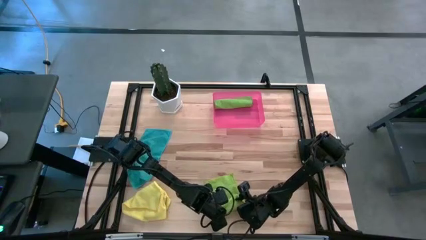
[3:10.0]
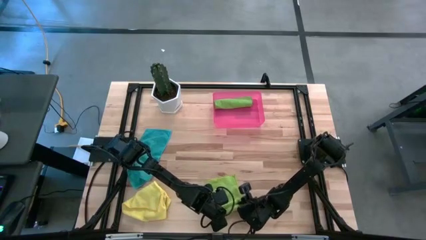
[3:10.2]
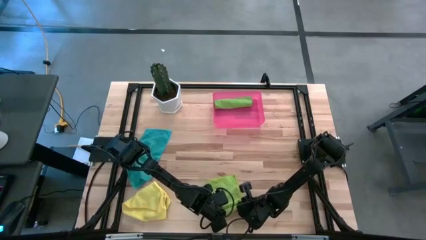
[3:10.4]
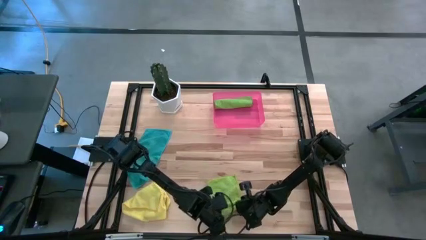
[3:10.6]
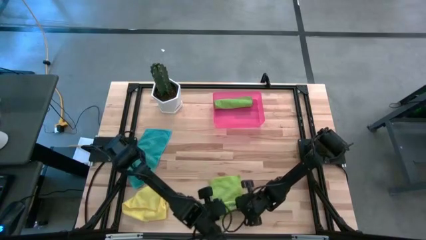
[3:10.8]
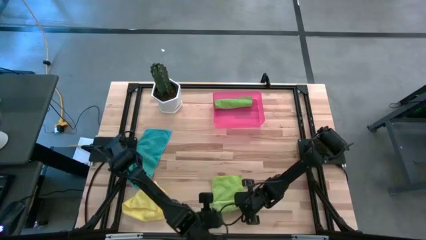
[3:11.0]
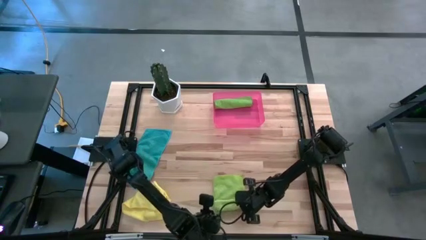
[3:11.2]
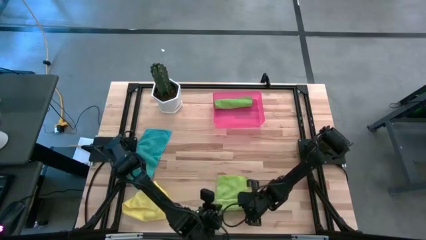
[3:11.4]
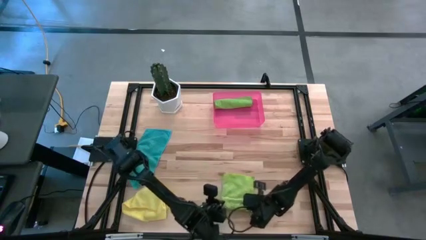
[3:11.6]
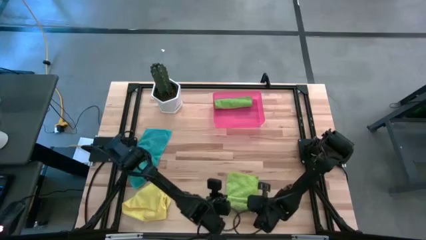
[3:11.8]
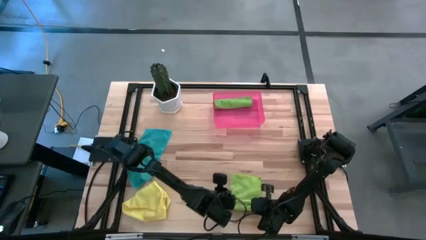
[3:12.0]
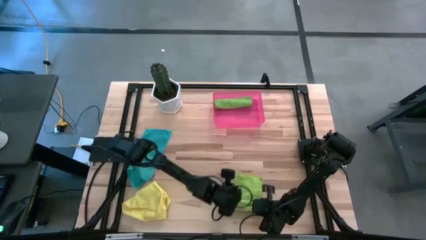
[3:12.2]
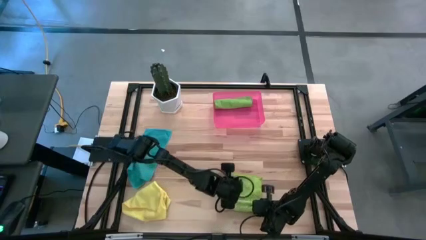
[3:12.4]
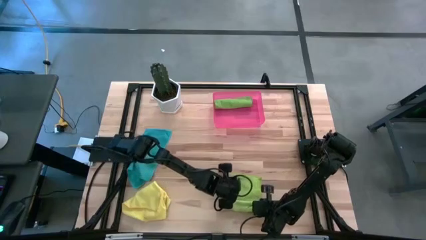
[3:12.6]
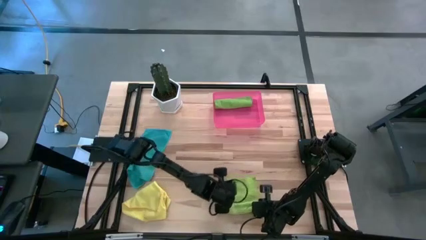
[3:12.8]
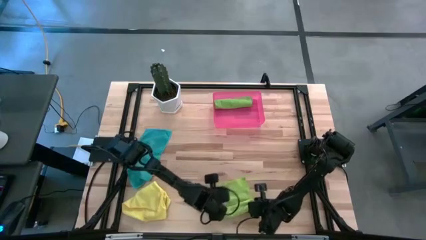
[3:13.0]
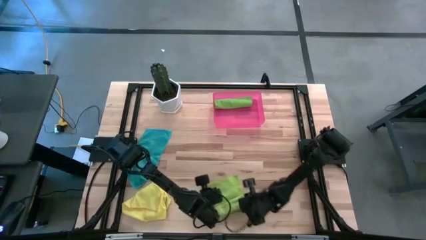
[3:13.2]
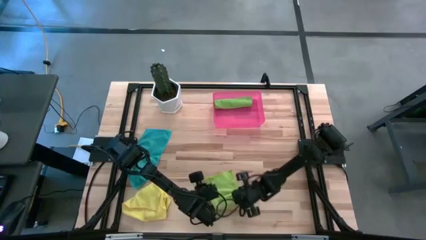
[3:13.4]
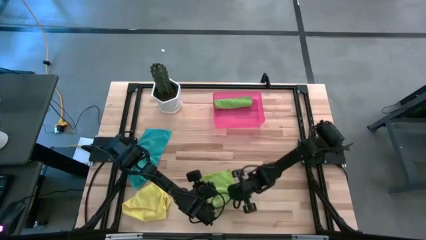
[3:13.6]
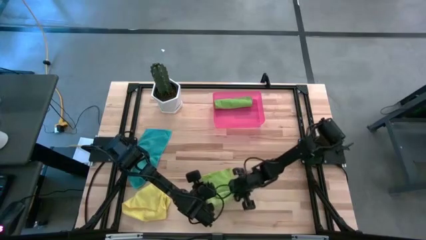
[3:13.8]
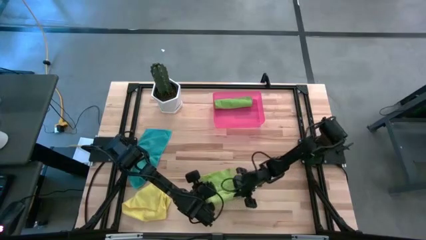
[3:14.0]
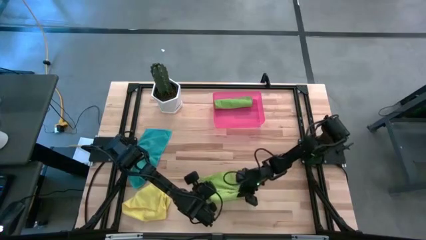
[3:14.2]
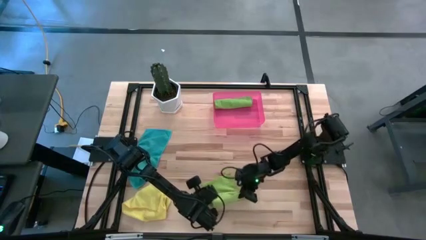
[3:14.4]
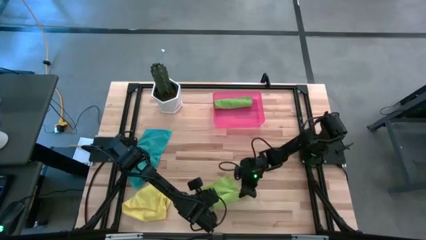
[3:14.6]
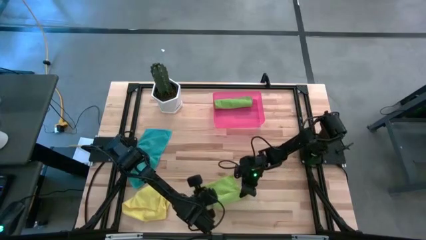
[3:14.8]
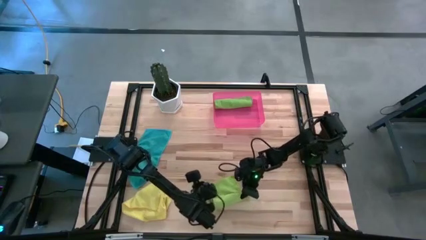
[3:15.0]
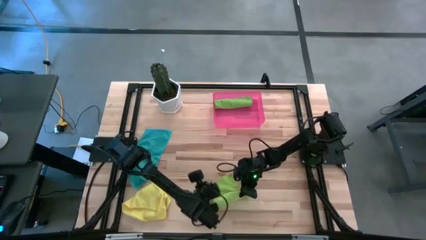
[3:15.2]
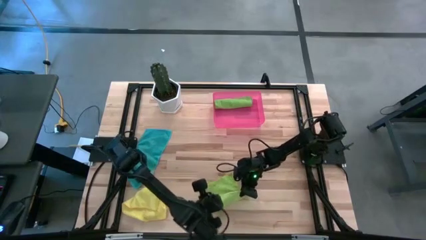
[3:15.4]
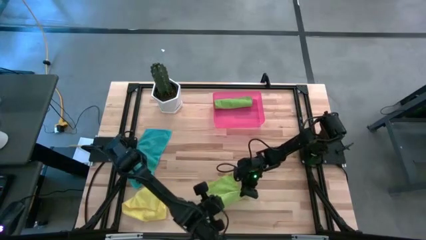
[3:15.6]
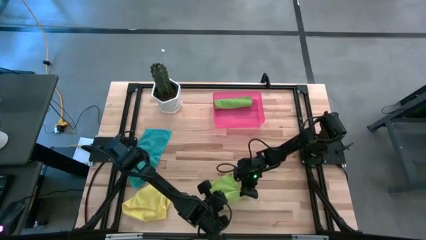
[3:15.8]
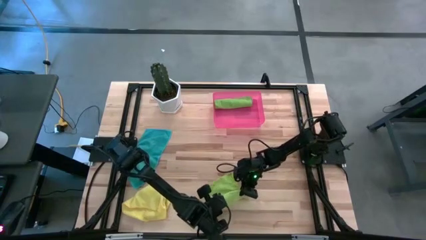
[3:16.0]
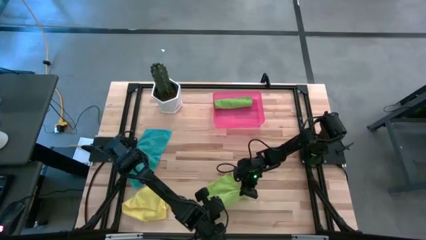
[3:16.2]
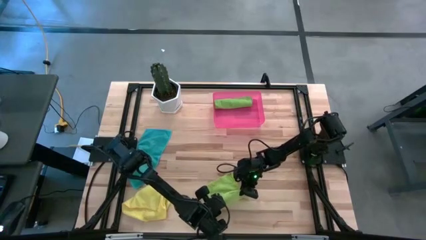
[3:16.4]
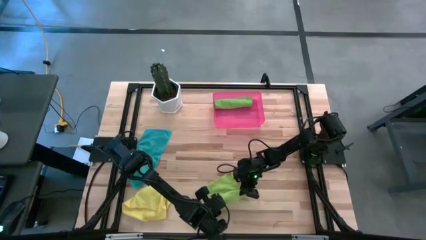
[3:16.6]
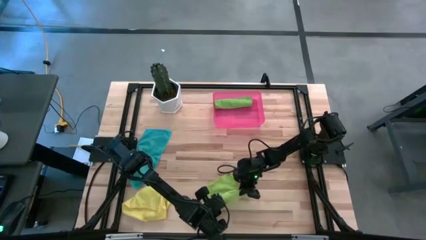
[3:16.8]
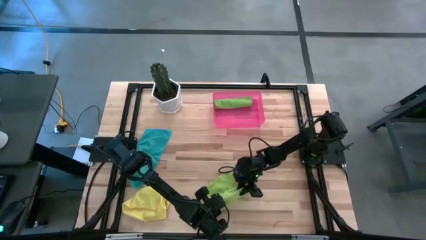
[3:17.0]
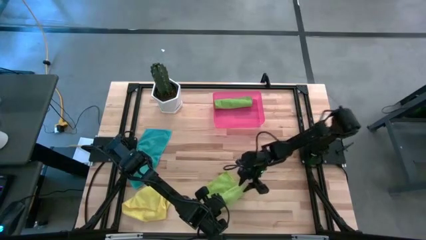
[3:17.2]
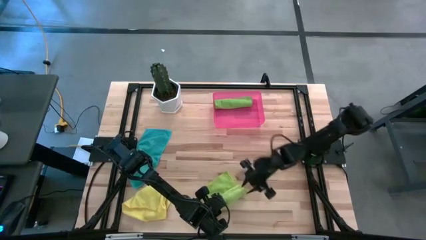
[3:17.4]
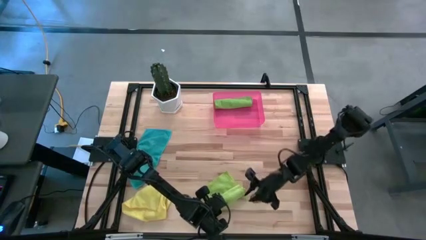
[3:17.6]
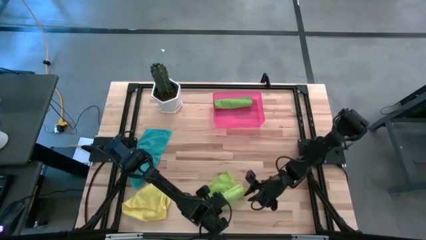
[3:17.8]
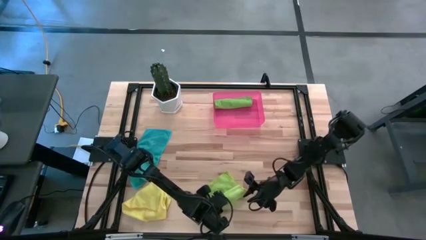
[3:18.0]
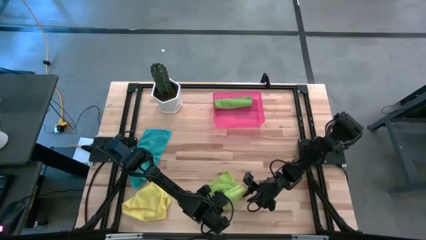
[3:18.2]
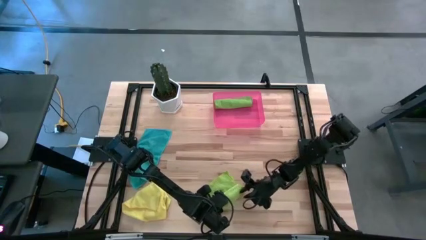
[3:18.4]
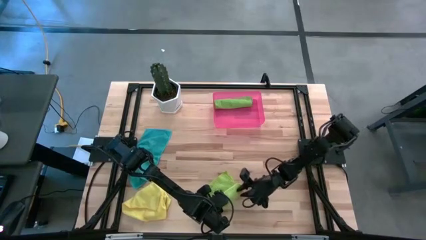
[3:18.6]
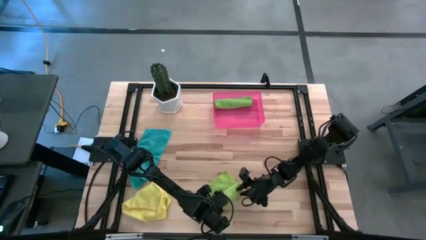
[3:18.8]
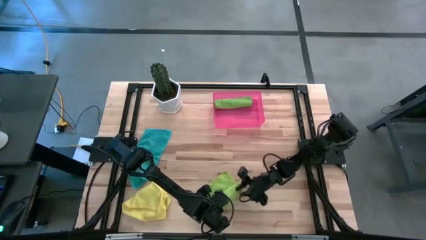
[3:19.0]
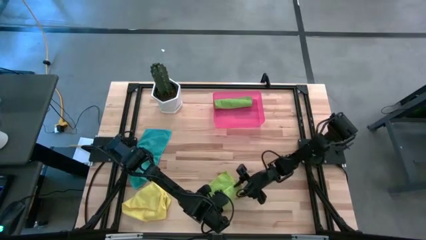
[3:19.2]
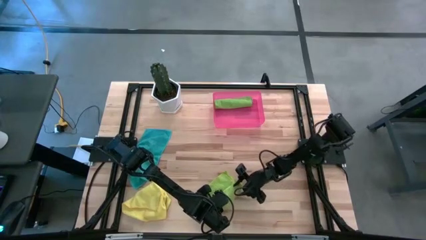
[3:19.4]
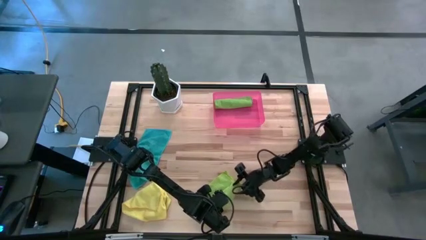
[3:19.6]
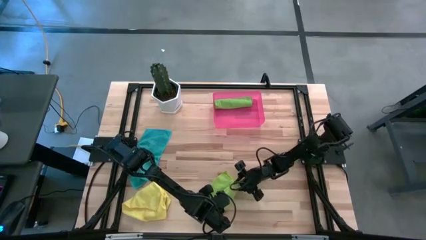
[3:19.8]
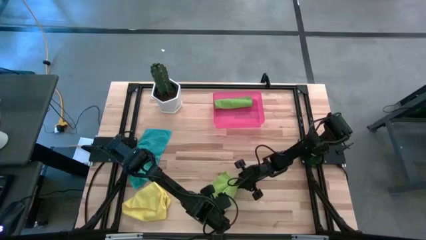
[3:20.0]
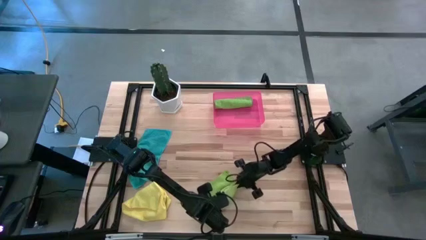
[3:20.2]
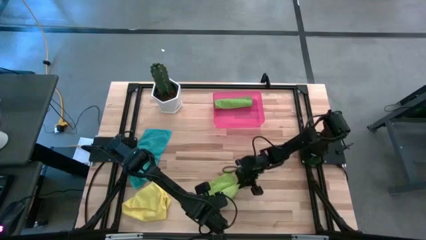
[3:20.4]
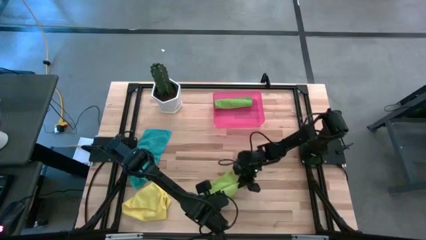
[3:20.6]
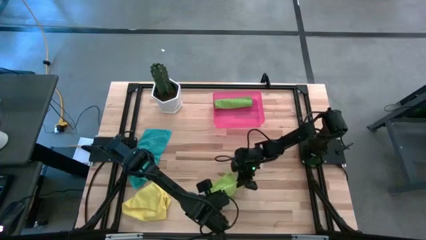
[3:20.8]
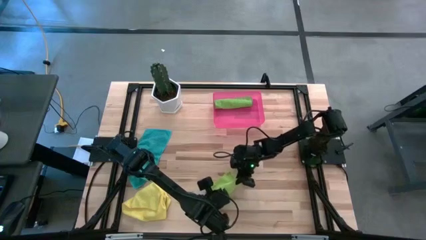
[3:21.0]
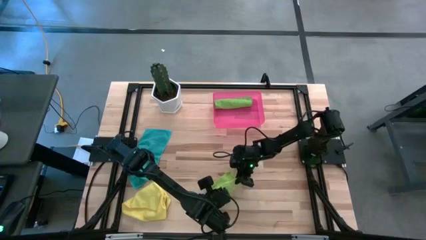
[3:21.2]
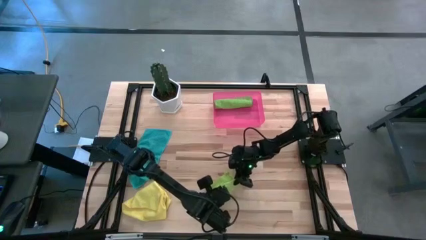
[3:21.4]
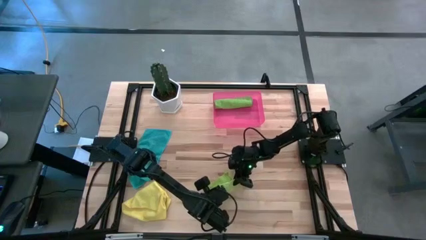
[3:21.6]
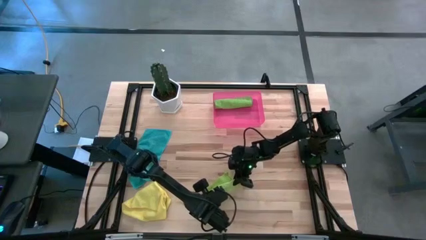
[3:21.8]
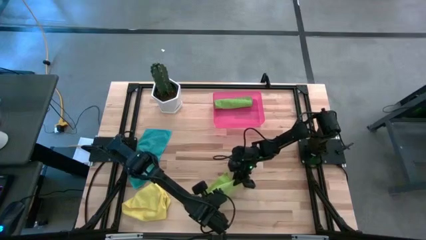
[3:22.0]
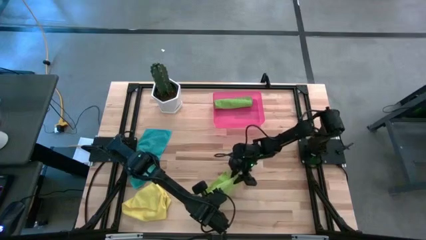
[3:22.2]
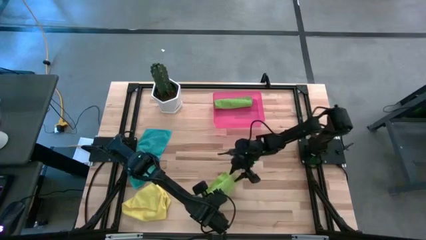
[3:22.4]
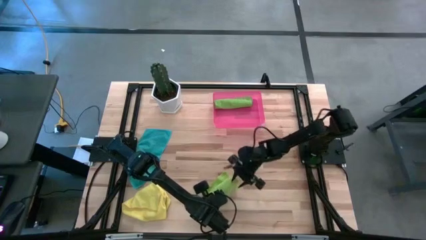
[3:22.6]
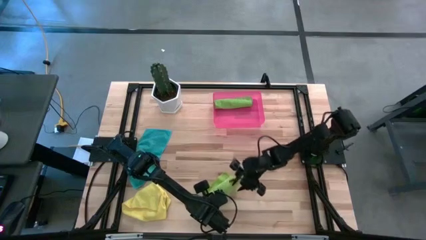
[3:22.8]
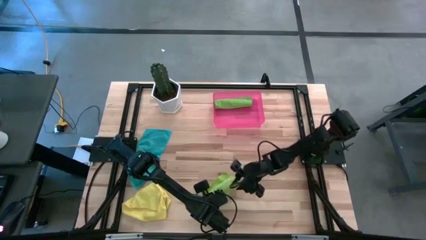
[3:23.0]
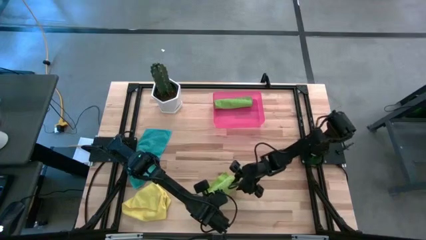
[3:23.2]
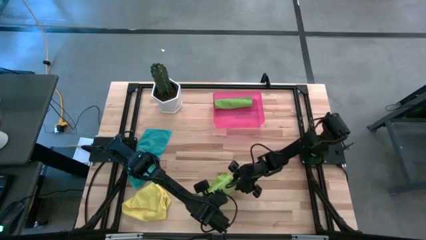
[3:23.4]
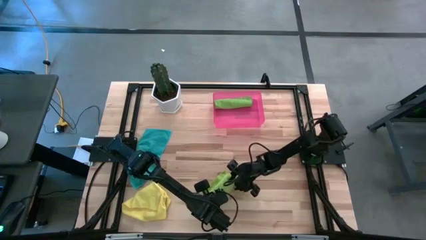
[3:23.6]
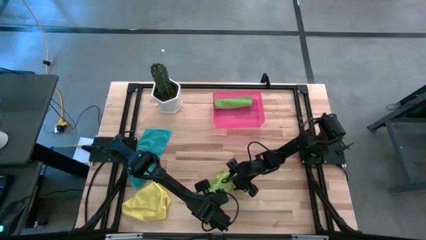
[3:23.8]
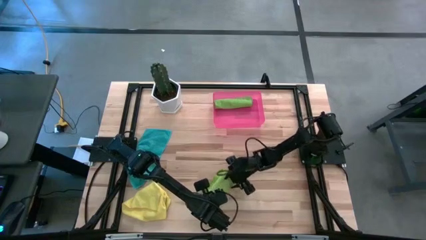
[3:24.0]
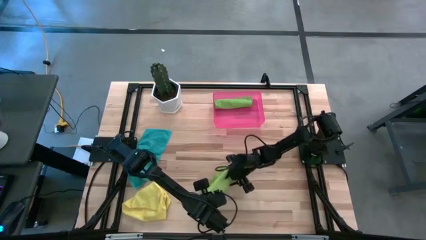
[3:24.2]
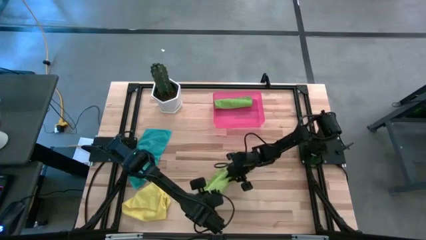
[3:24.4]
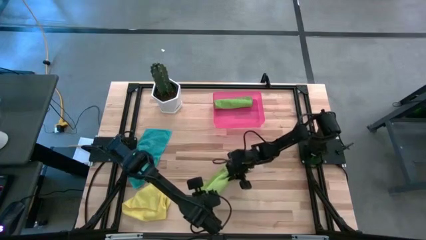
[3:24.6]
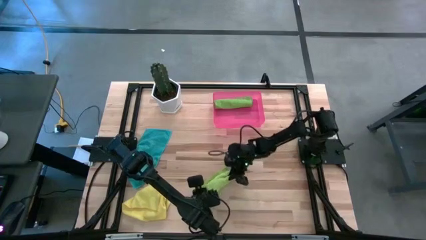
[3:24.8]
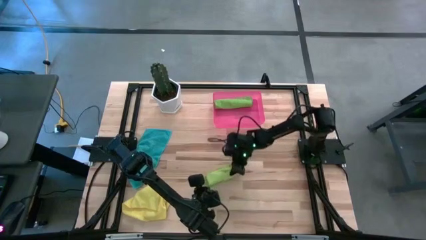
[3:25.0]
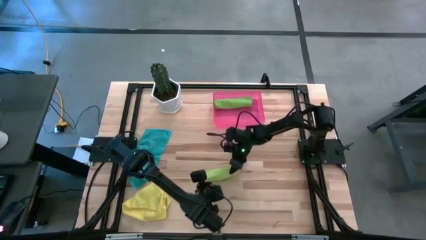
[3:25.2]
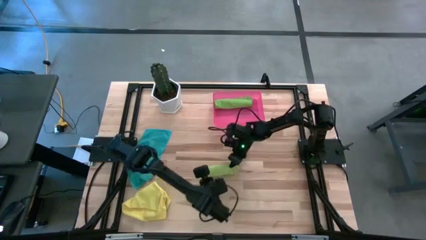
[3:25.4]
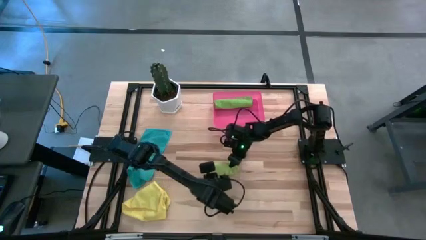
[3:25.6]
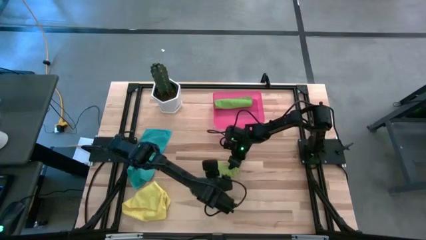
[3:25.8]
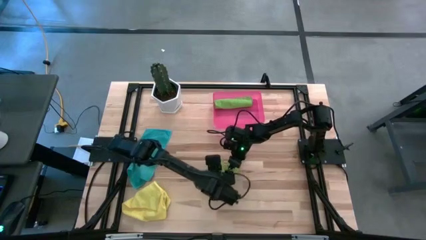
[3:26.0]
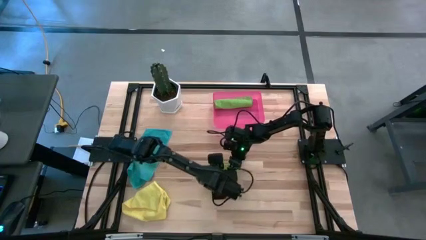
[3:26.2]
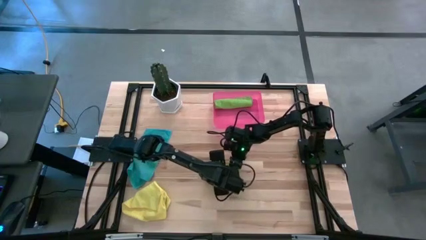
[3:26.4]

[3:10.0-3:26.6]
Task: Roll microfiber towels into tight, uniform cylinder then place into a basket
Roll the light green microfiber cloth
